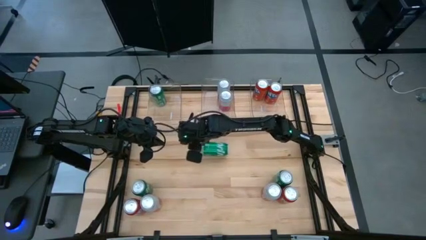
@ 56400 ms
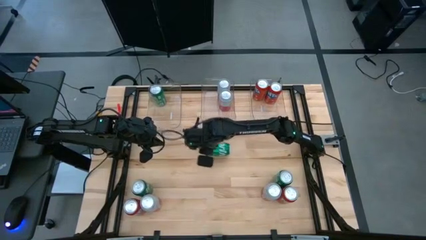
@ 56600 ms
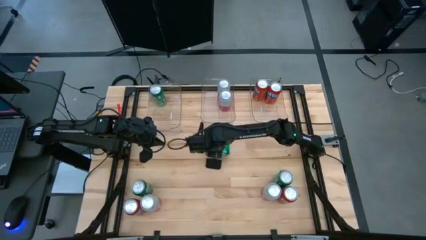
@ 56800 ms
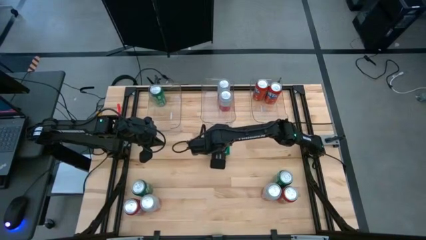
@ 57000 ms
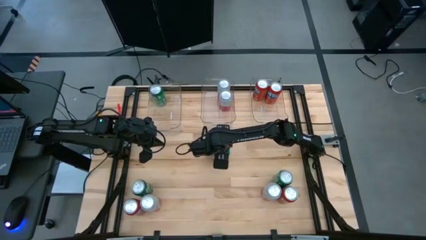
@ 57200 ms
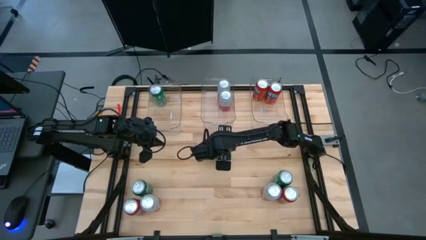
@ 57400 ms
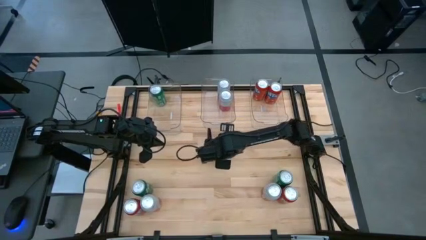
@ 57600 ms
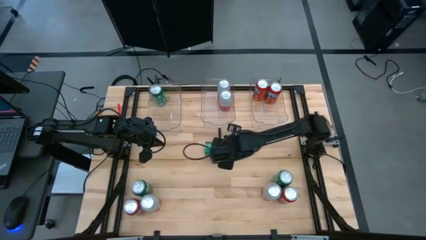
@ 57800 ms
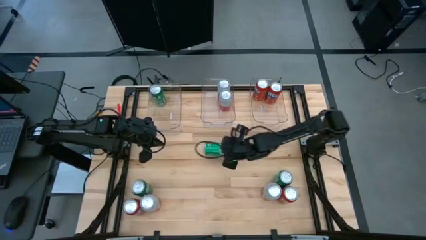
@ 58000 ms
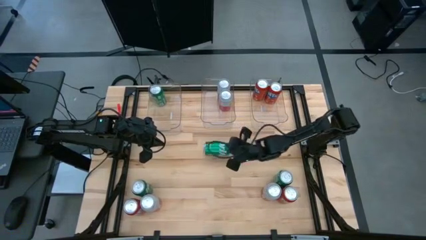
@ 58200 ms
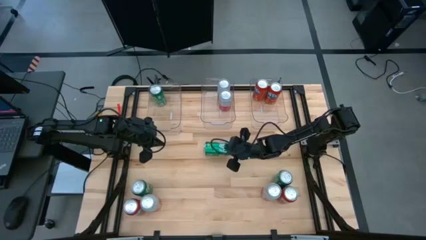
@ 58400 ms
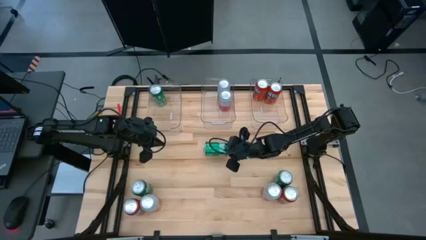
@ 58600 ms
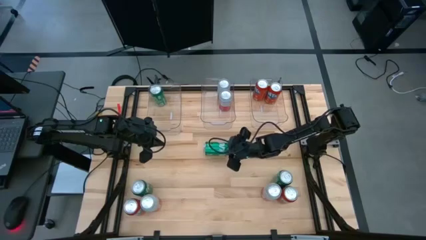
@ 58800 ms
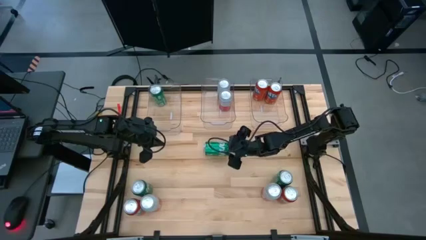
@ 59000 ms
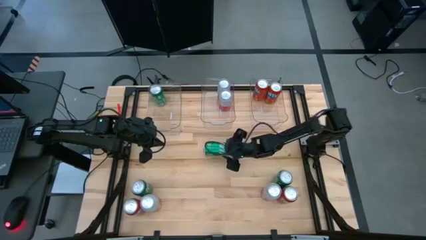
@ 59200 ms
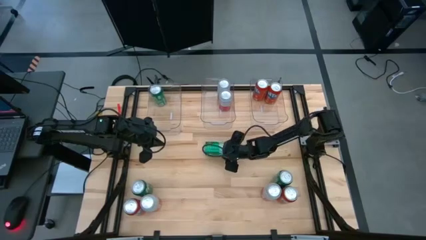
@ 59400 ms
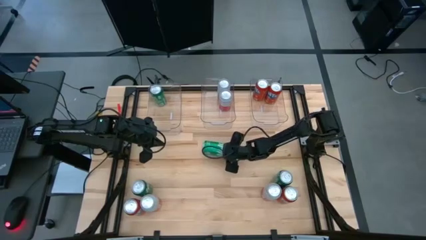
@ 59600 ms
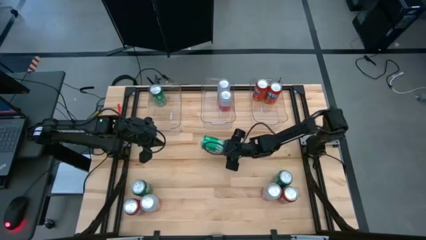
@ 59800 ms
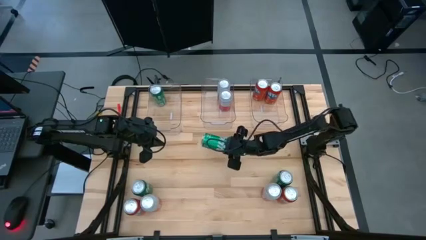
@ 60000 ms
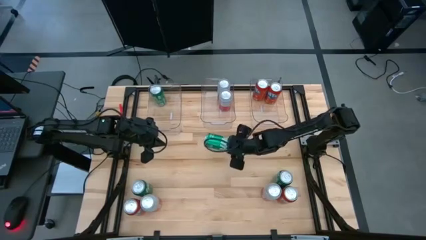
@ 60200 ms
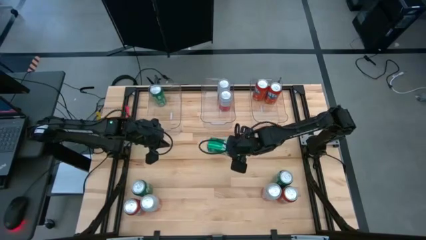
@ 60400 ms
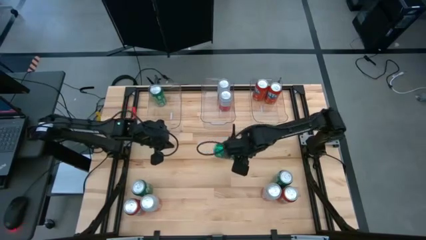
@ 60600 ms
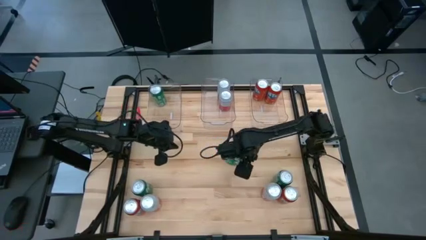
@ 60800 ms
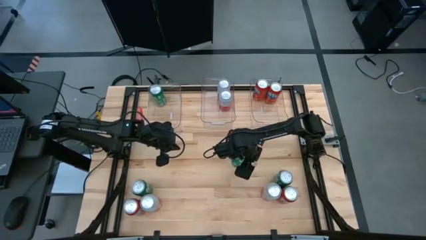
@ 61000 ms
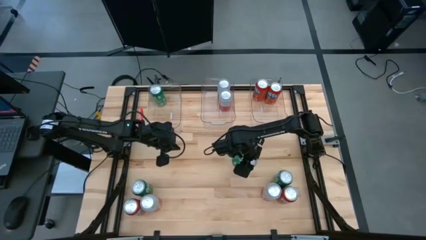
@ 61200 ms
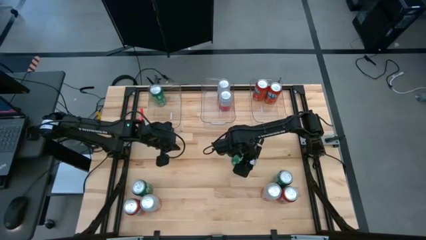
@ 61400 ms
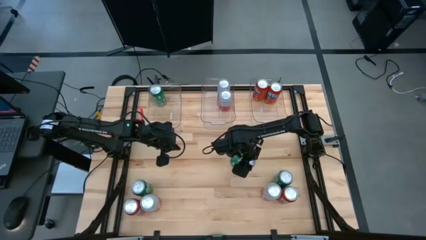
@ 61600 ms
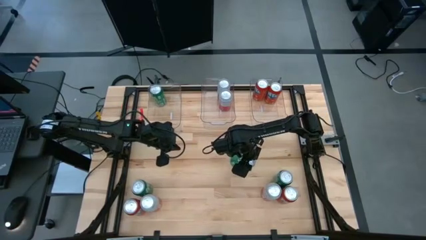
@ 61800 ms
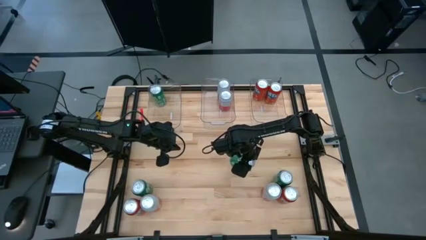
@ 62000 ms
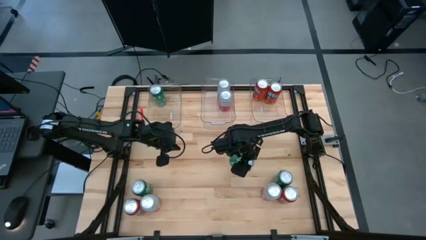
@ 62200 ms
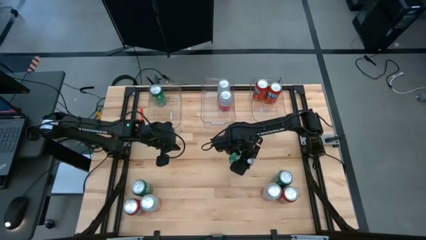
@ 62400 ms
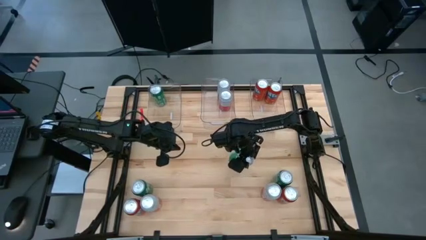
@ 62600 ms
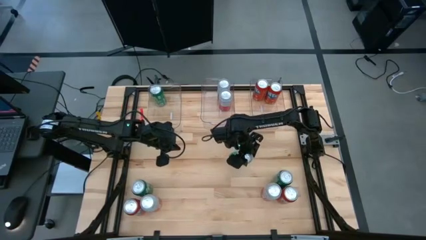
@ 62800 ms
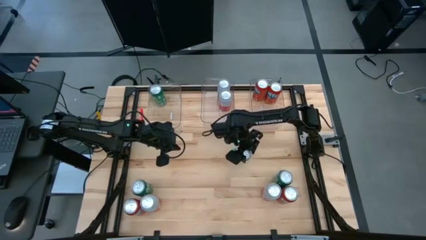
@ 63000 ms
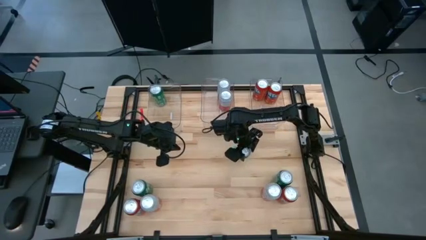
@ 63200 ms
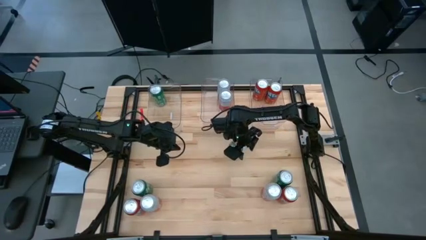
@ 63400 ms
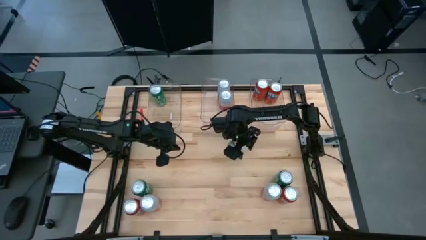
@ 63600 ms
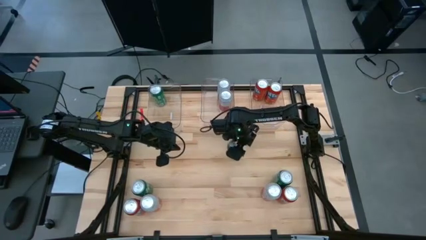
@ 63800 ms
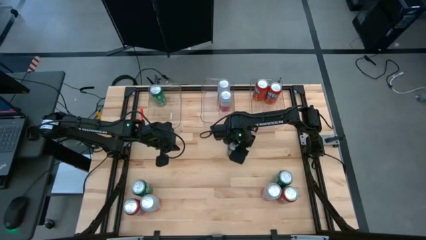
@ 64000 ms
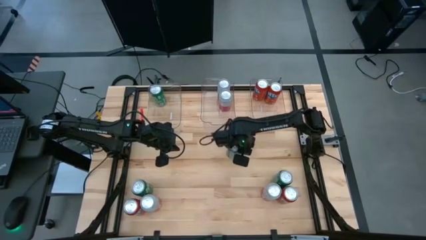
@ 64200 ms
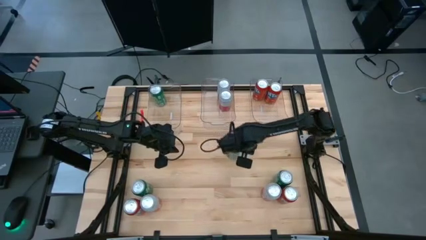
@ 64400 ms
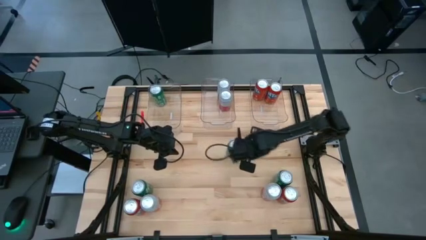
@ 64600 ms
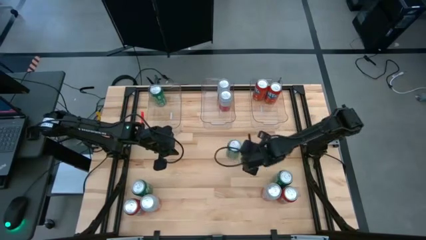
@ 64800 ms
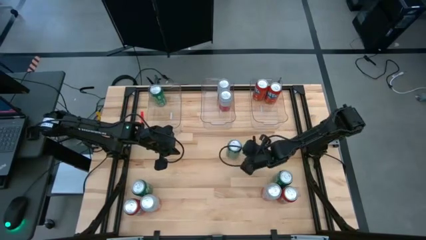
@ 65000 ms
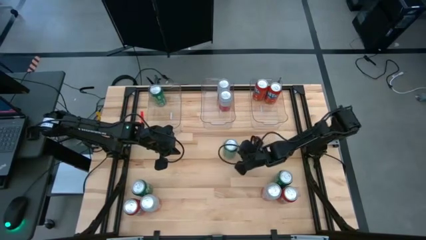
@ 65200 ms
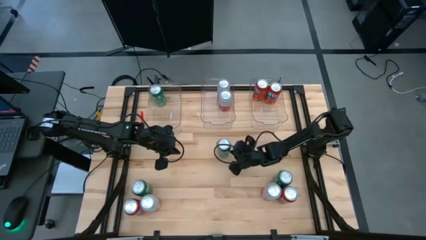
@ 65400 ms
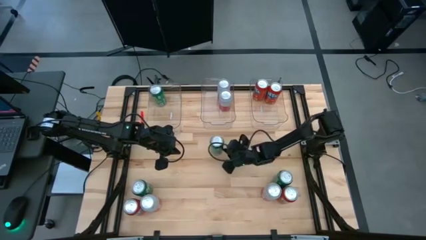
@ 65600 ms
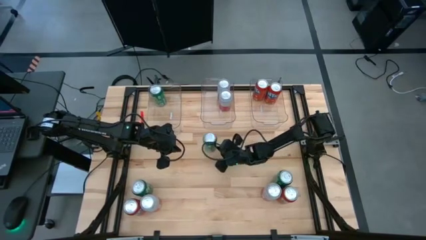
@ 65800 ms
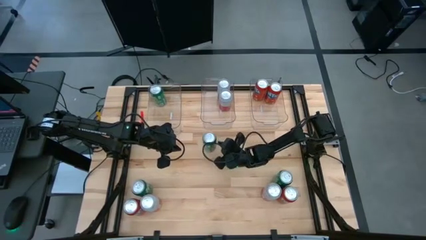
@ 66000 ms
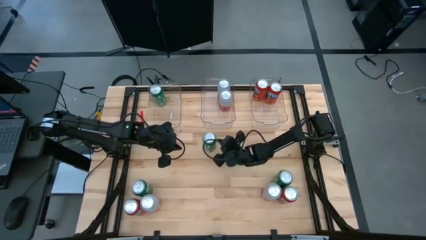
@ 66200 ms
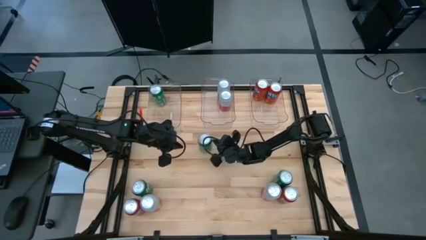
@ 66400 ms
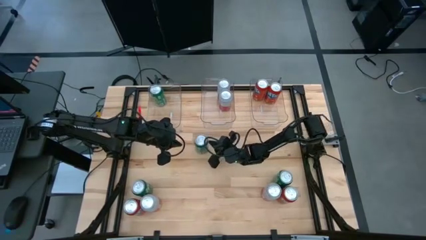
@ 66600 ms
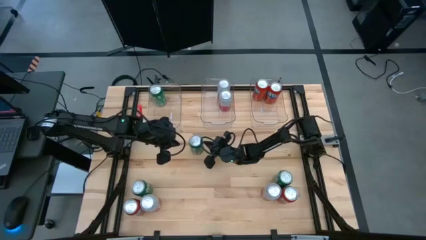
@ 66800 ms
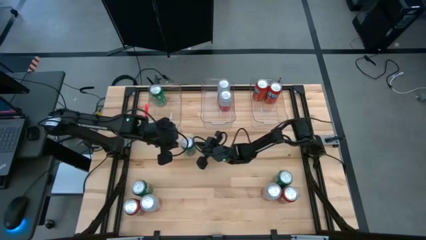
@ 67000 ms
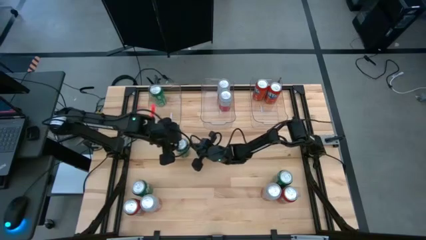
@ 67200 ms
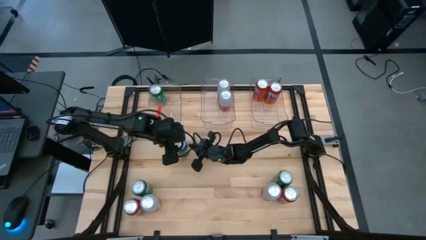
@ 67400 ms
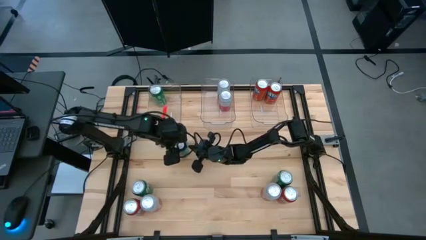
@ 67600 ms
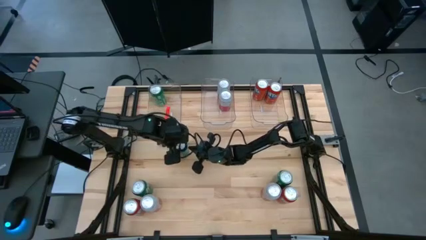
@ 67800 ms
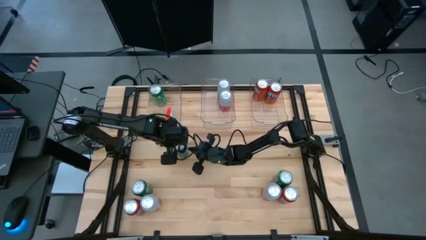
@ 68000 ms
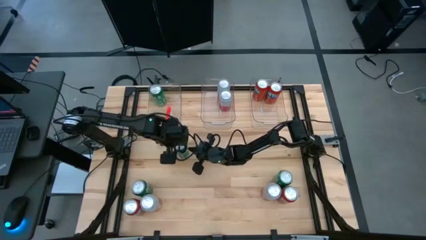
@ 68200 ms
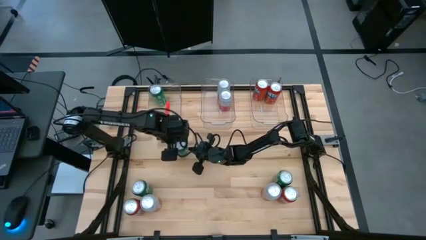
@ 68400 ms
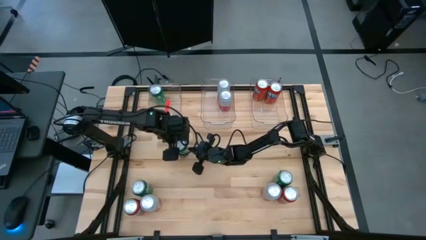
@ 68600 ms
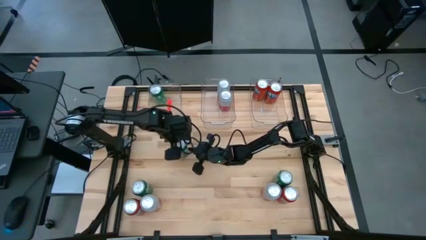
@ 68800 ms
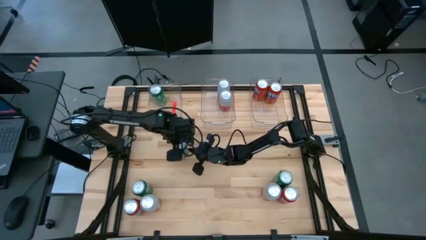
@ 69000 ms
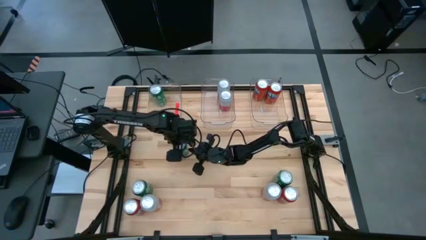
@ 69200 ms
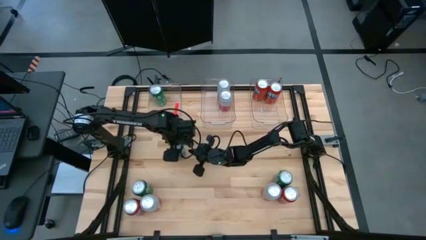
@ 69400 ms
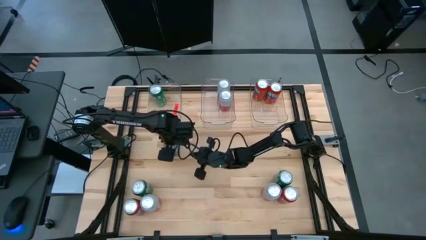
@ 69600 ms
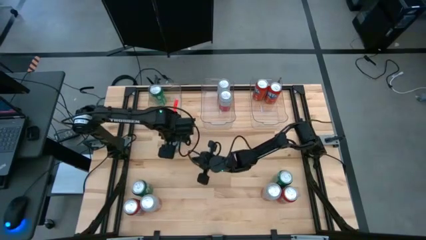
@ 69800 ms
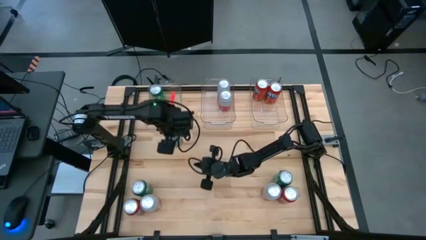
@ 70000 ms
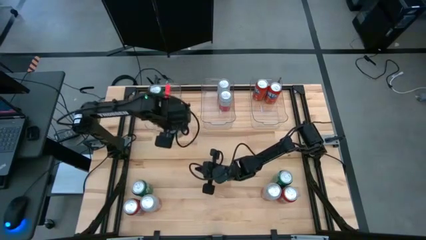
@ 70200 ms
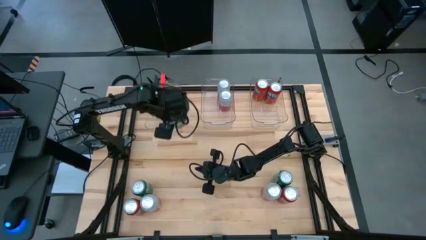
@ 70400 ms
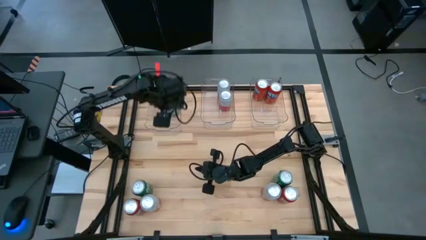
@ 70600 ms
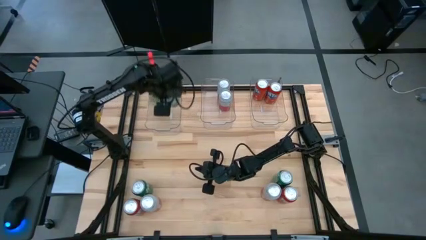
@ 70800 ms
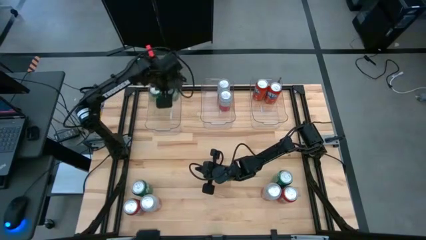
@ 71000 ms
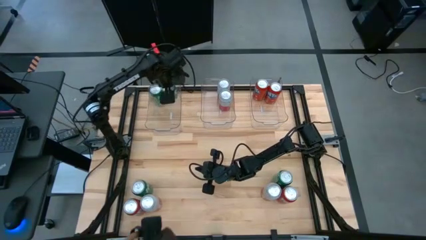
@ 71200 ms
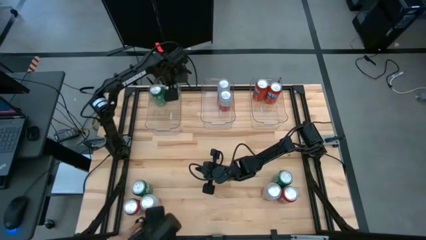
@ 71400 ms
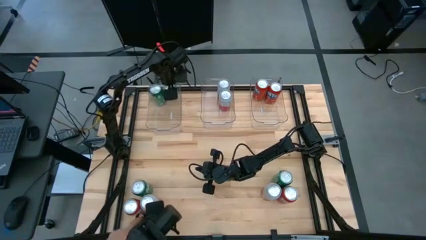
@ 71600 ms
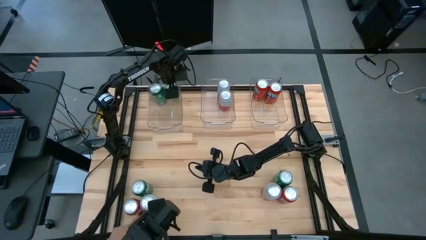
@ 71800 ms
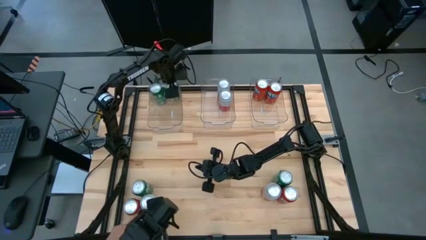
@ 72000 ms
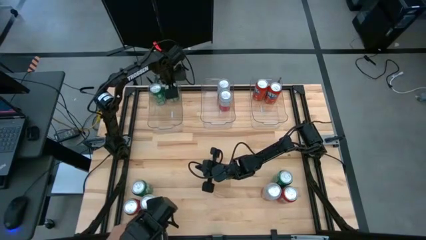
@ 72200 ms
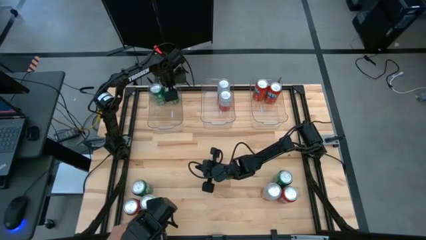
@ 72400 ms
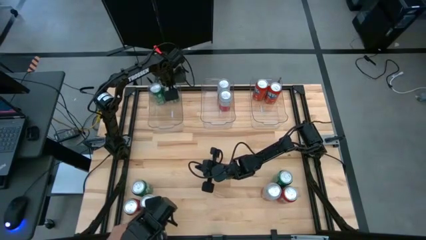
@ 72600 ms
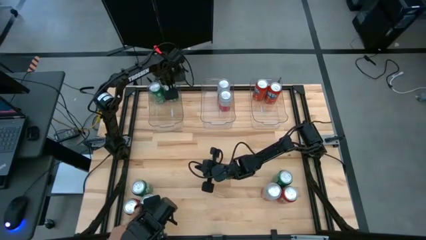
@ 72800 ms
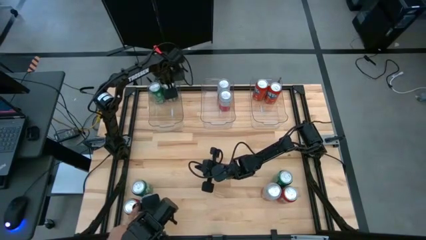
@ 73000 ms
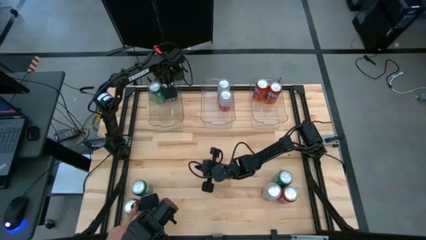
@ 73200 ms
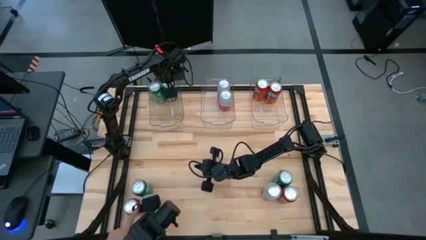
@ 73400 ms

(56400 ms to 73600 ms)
Task: Sort soda cans
Put the green soda can into the left transparent bin

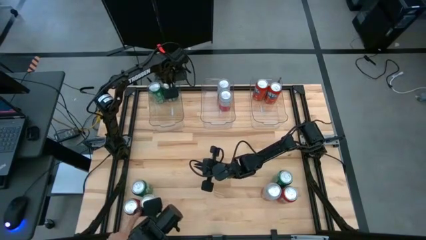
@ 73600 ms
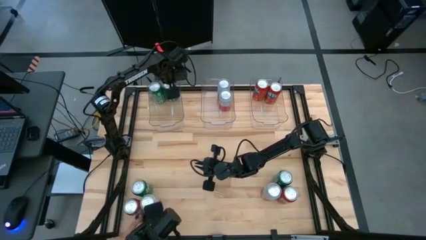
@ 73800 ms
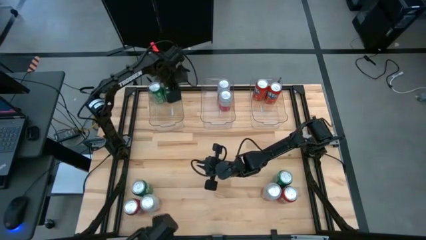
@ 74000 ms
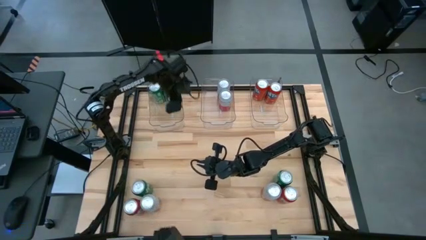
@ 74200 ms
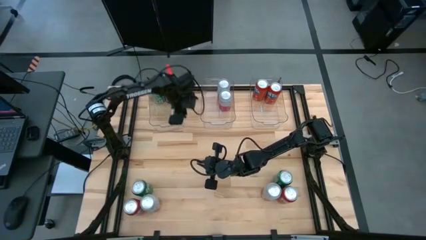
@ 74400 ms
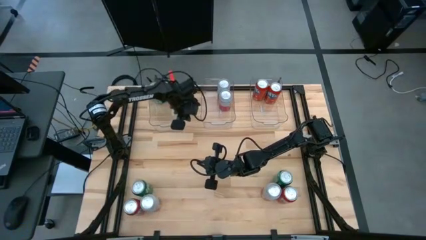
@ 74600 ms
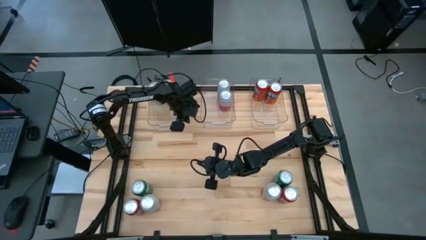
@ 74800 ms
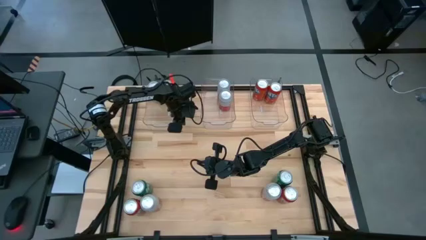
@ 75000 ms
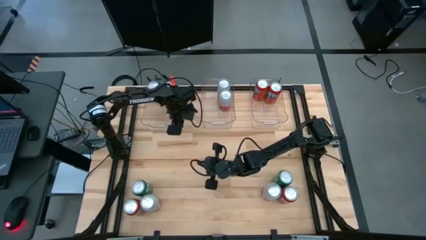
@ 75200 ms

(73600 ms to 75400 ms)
Adjust the left transparent bin
